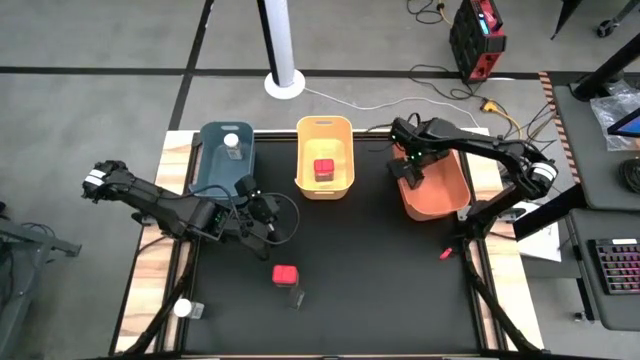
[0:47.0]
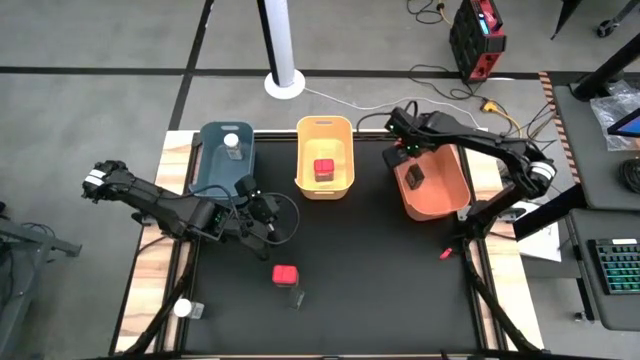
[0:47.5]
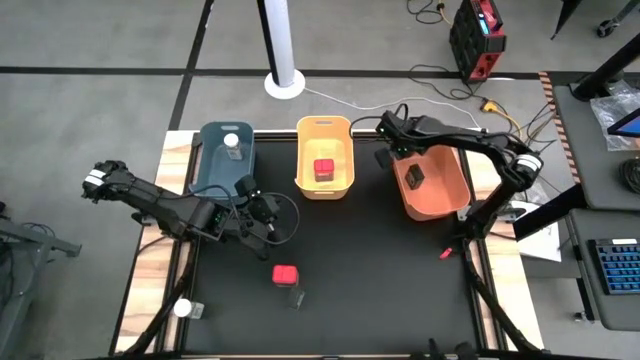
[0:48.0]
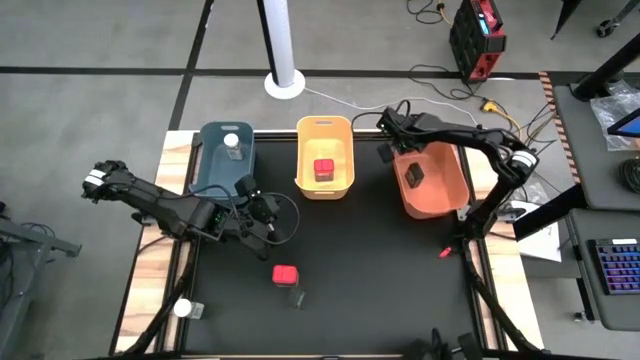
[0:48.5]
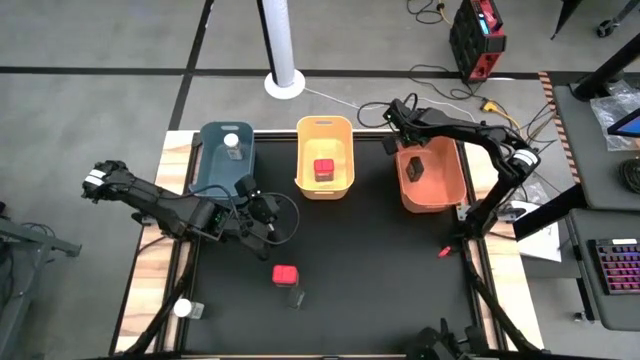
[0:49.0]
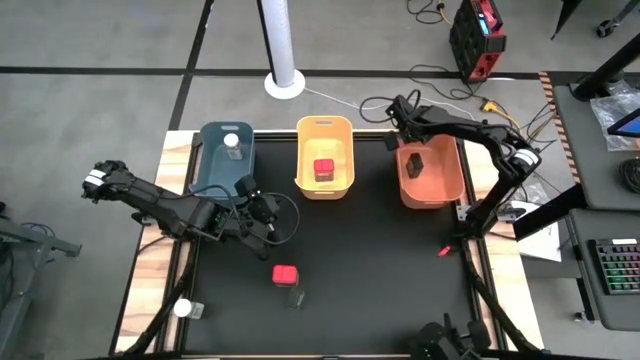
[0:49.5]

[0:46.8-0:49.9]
Task: Sort spices by type
Adjust the orange bin

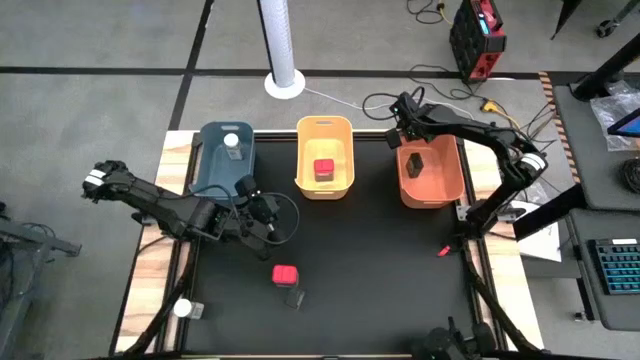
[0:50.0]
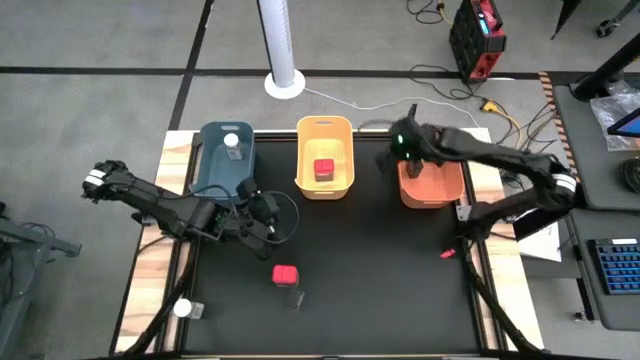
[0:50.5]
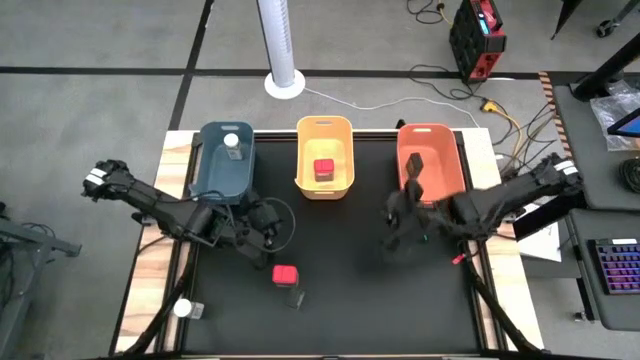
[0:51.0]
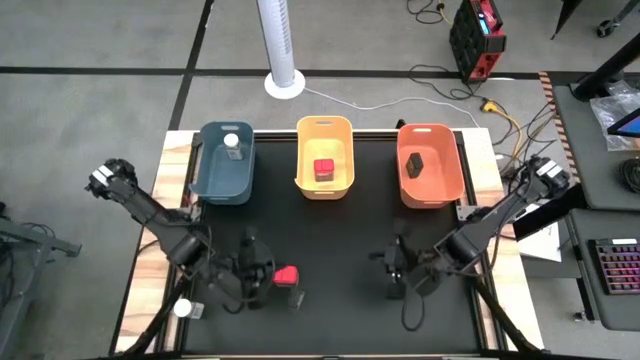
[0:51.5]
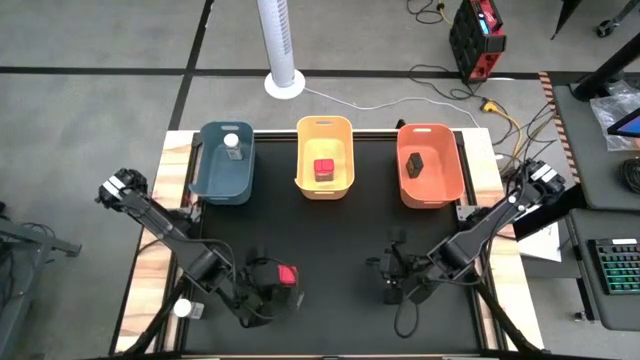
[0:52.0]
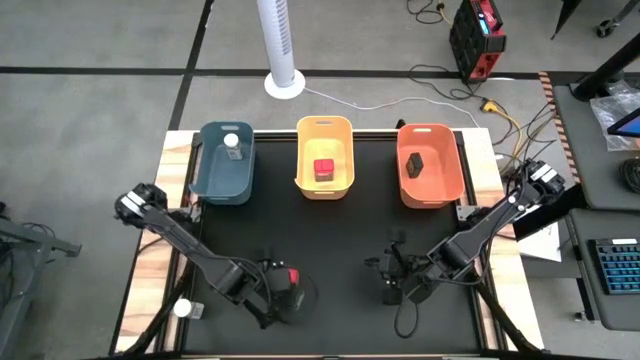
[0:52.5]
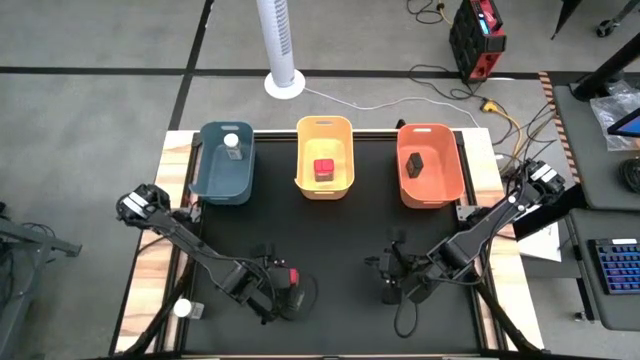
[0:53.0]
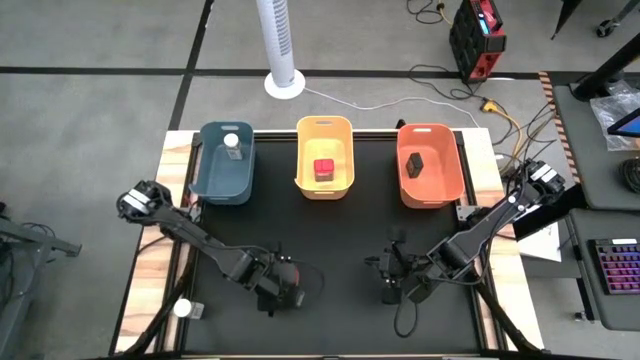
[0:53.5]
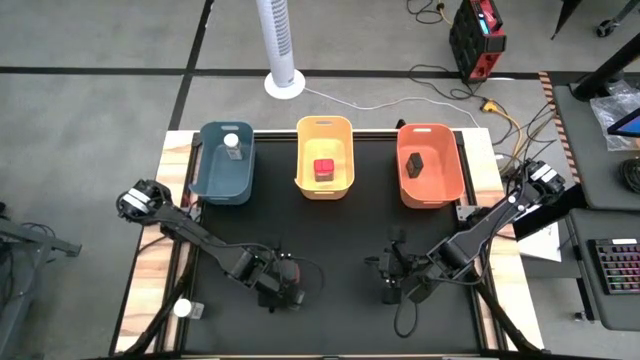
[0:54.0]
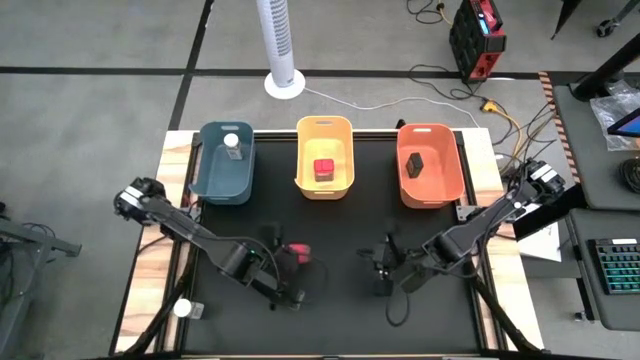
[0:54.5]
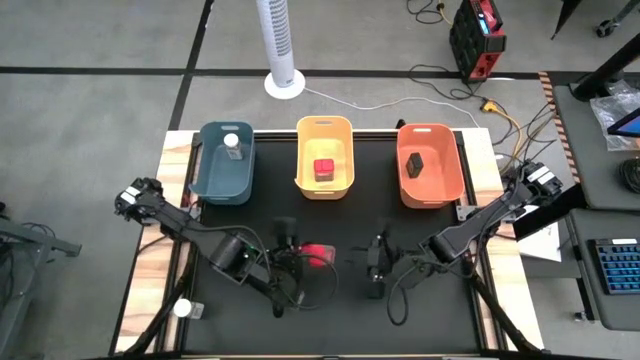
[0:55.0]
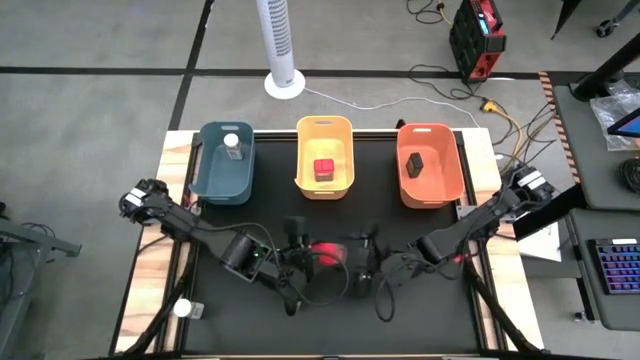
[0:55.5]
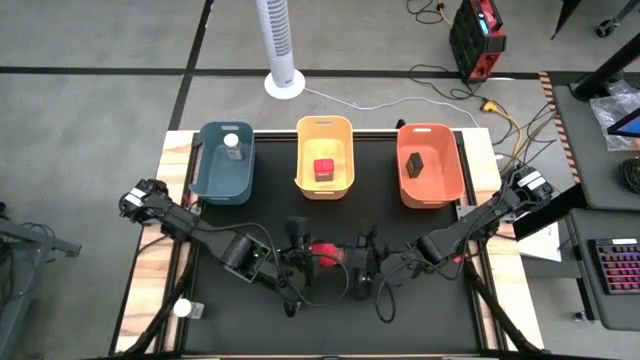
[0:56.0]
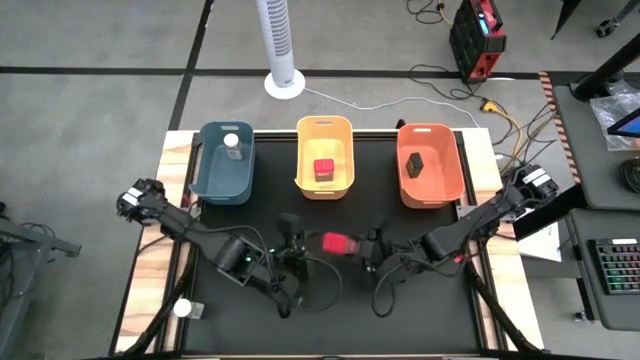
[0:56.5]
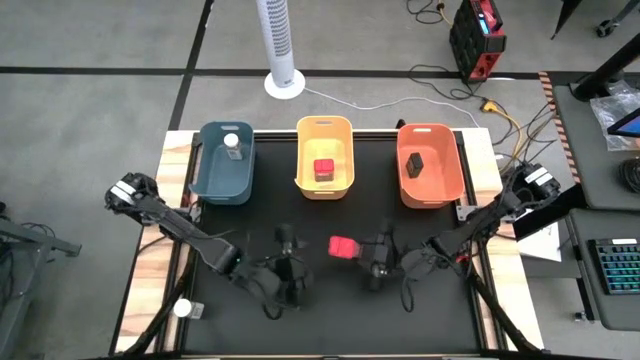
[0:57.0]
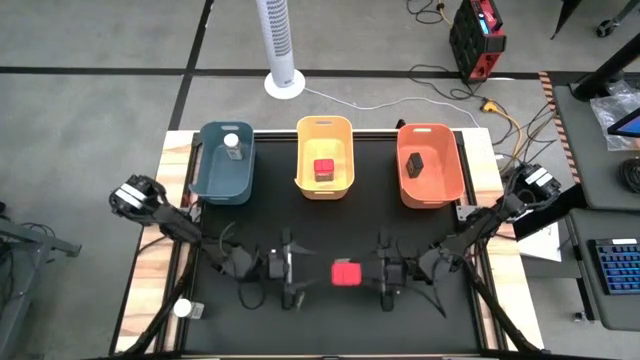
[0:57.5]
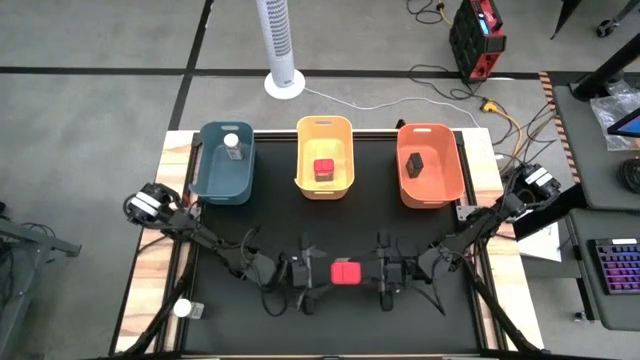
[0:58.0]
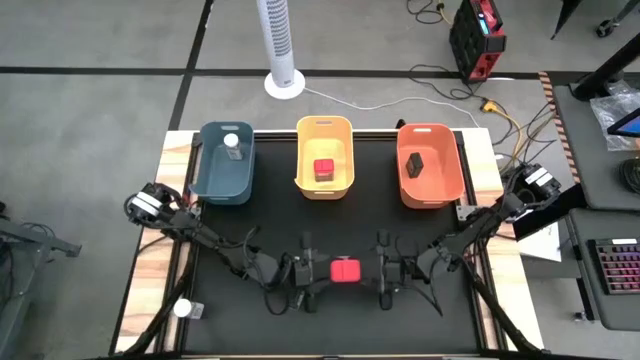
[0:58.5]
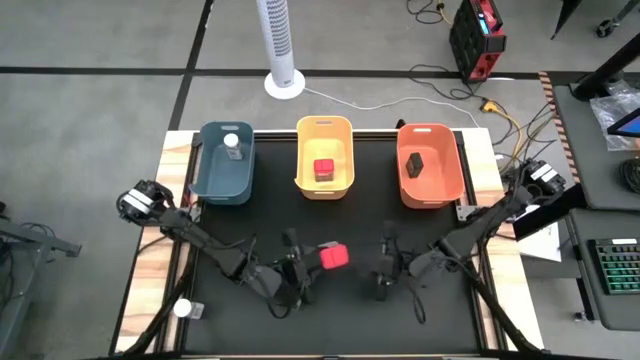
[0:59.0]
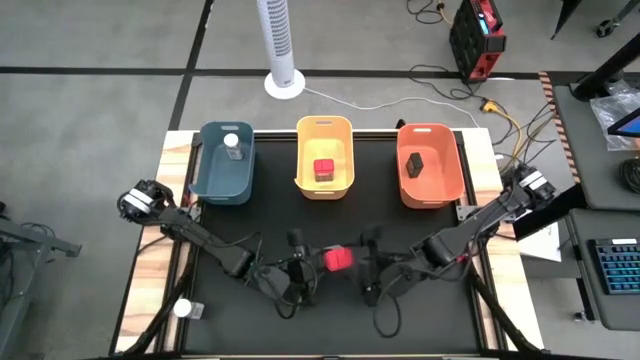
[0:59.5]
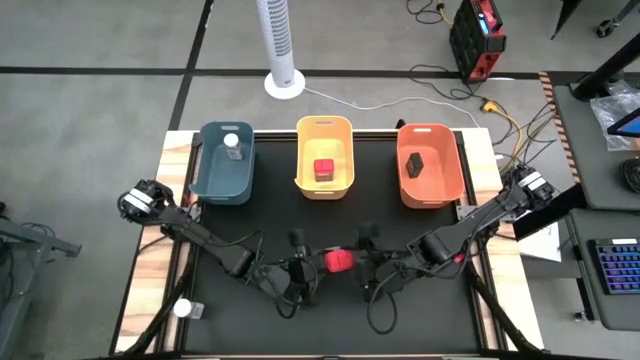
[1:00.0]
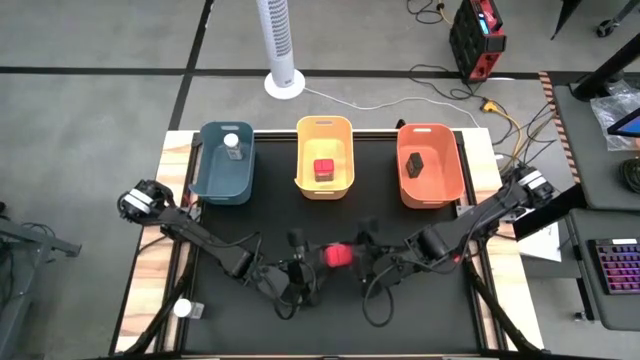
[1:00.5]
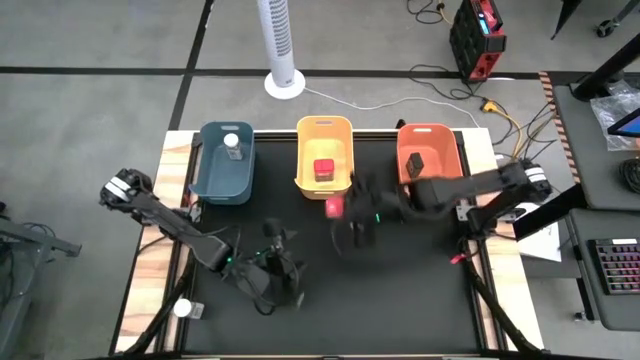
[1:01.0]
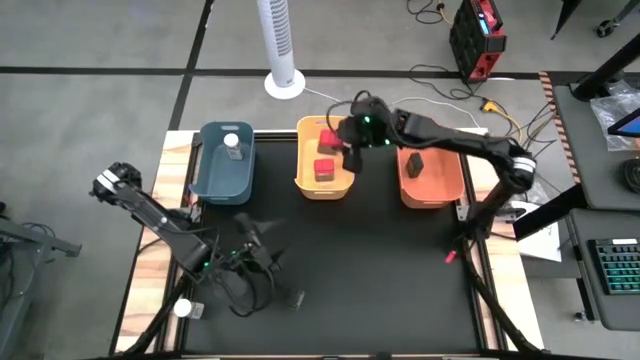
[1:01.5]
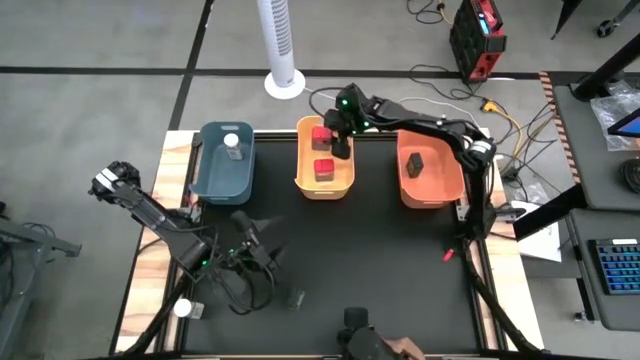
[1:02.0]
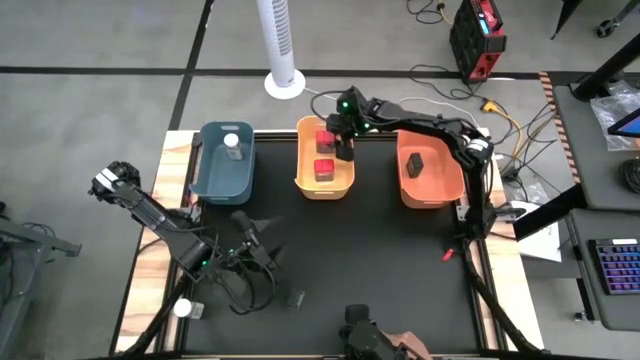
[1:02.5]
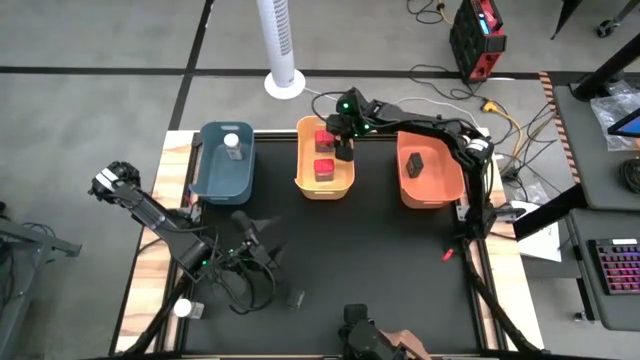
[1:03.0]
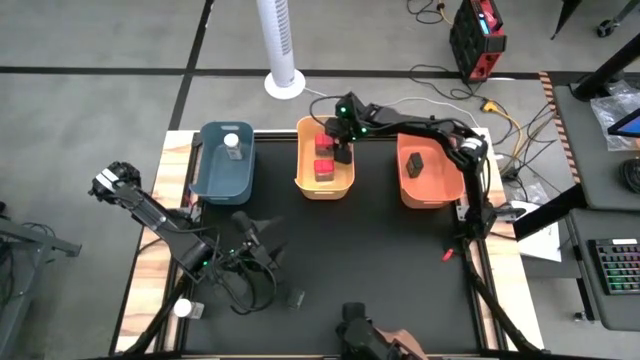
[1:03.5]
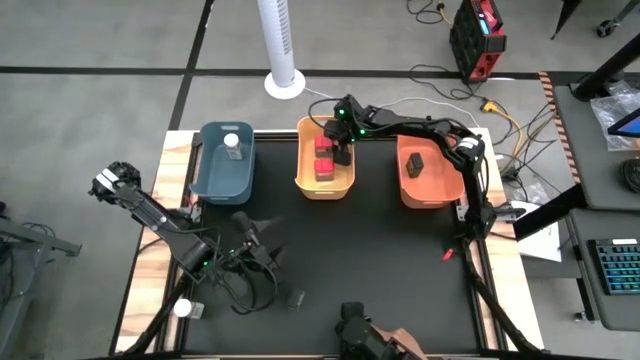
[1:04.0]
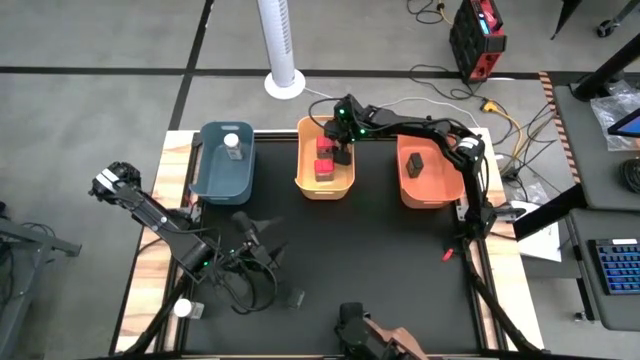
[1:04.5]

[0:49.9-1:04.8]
Put the red seasoning can into the yellow bin

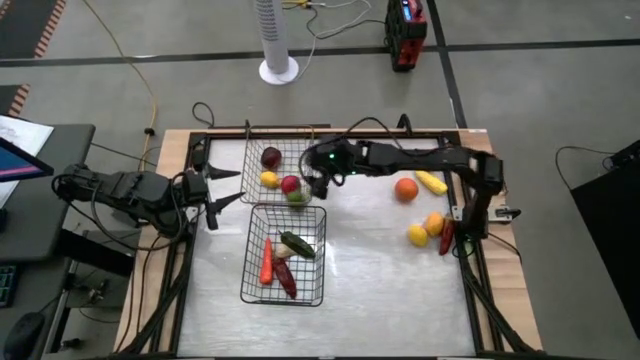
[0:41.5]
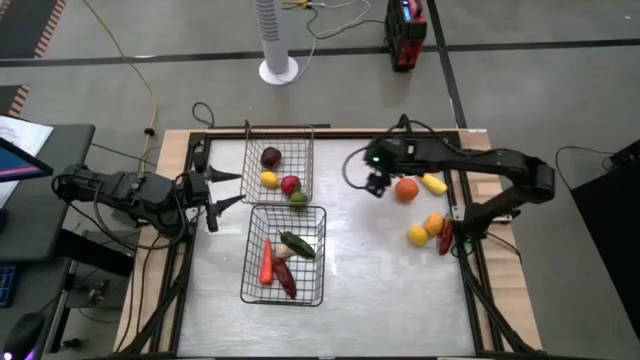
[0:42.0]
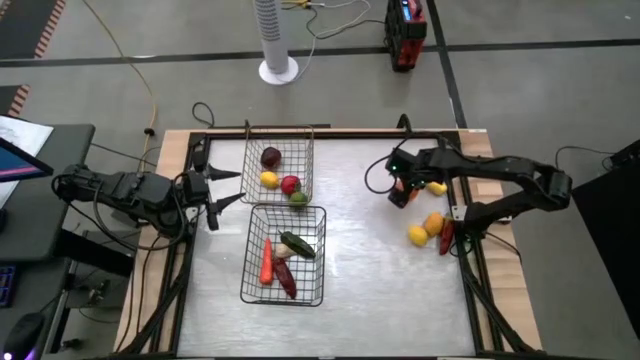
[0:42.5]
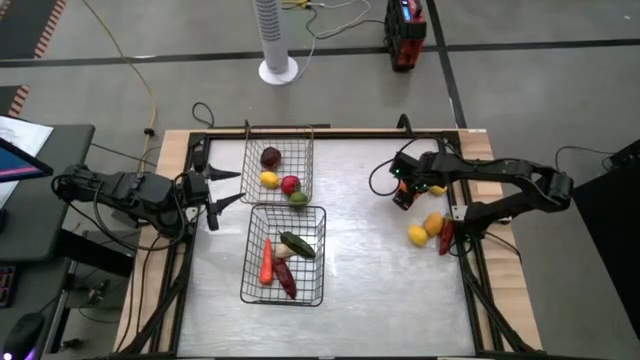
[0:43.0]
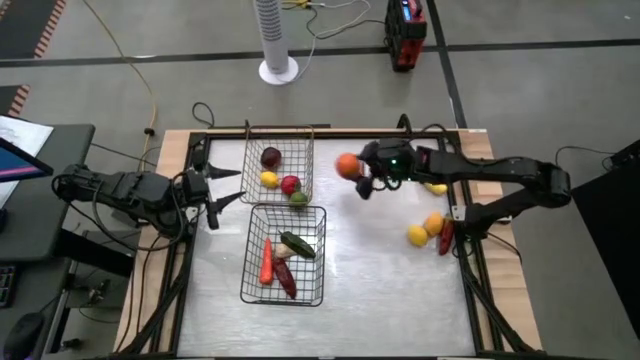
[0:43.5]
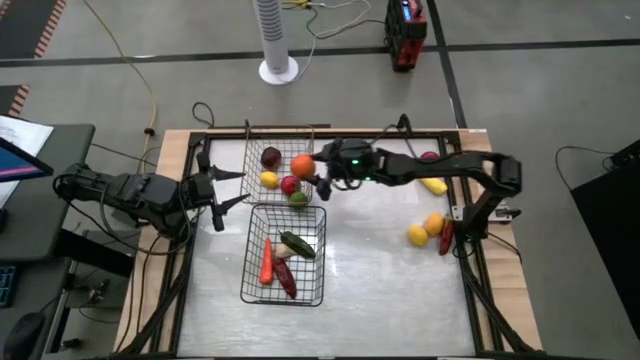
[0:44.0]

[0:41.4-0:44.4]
Task: Sort produce into baskets
Put the orange into the gold wire basket

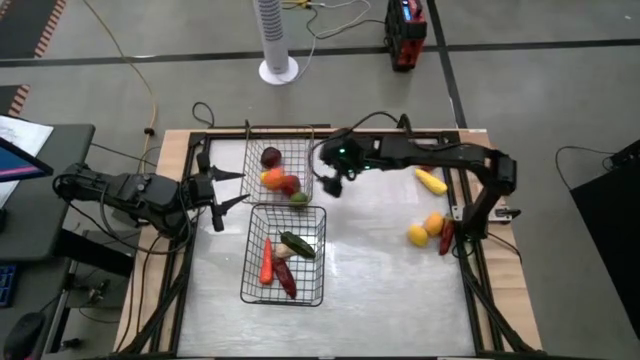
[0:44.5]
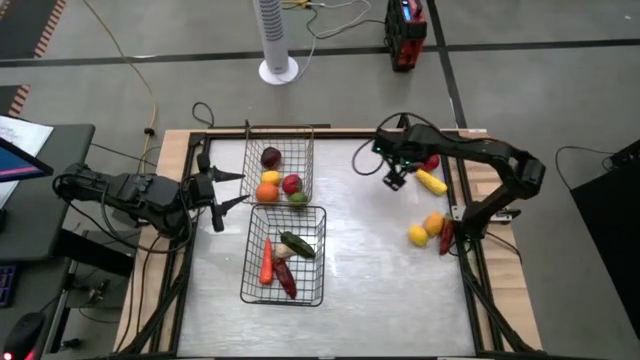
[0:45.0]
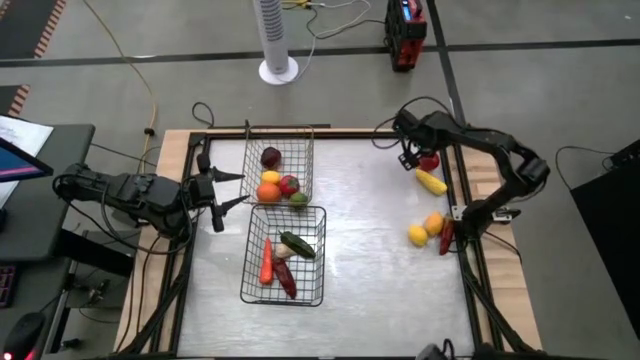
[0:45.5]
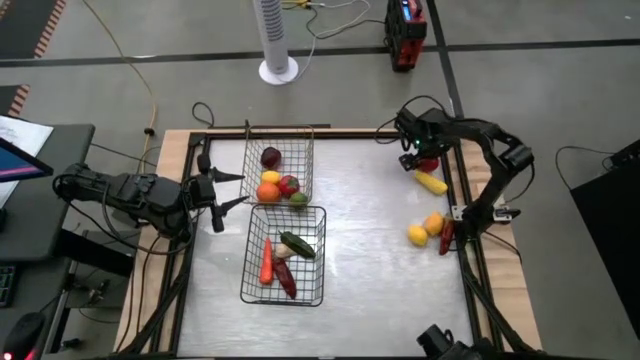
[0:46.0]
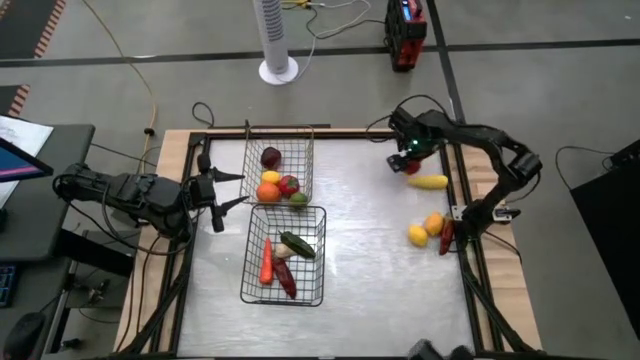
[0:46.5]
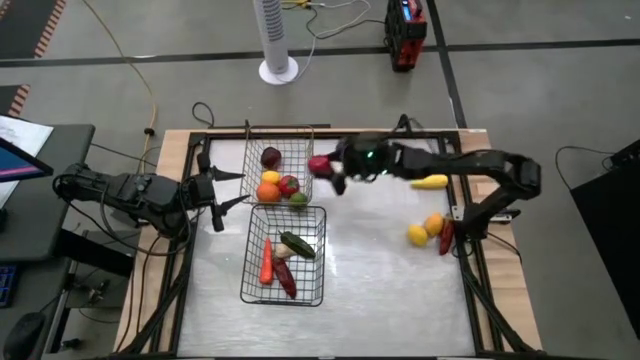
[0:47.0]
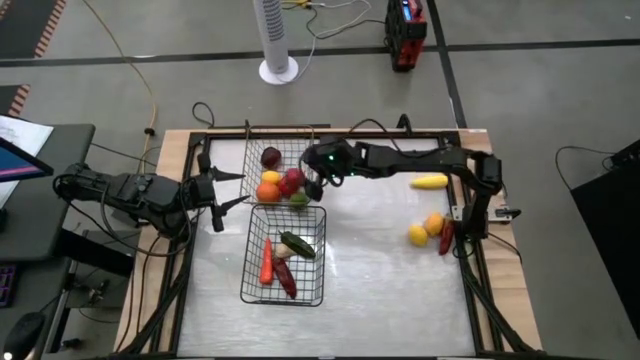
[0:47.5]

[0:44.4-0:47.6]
Put the tomato into the gold wire basket
